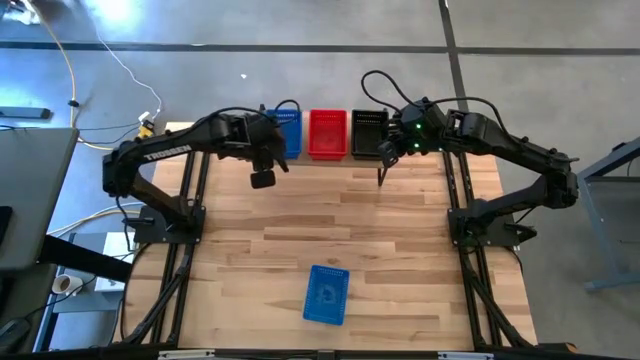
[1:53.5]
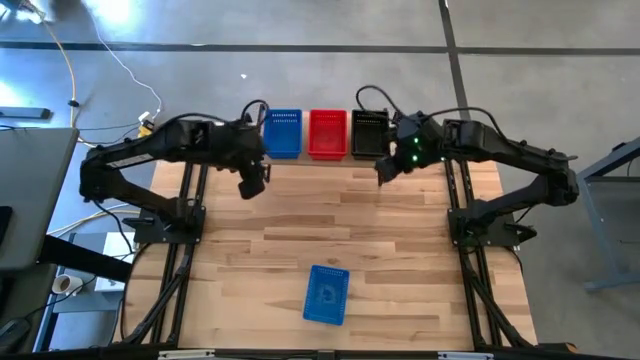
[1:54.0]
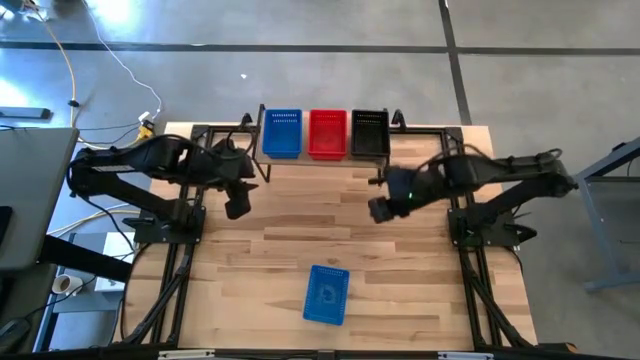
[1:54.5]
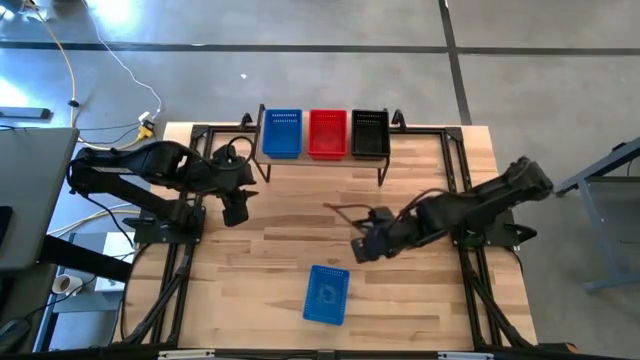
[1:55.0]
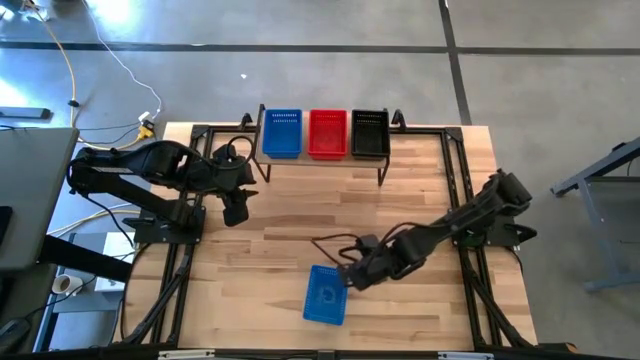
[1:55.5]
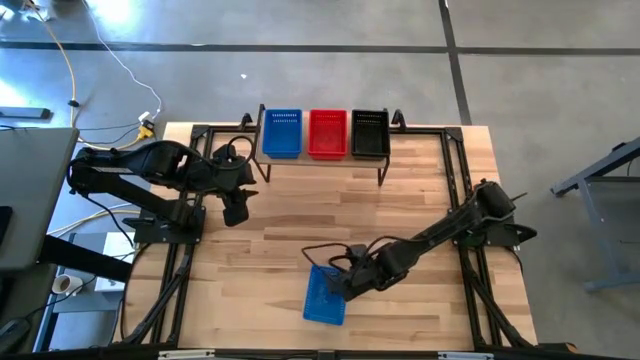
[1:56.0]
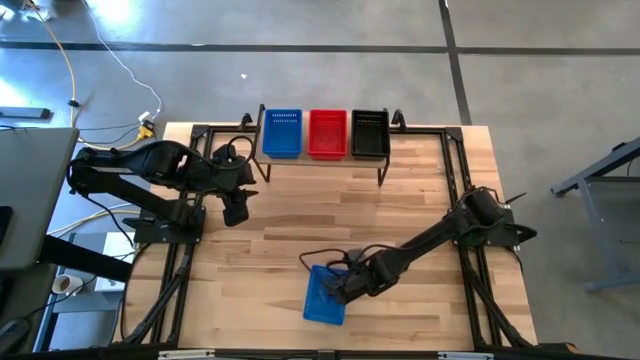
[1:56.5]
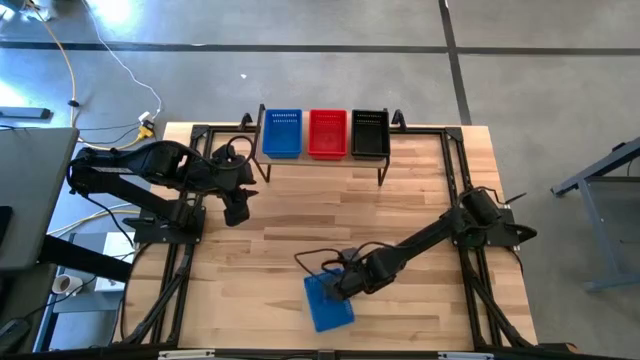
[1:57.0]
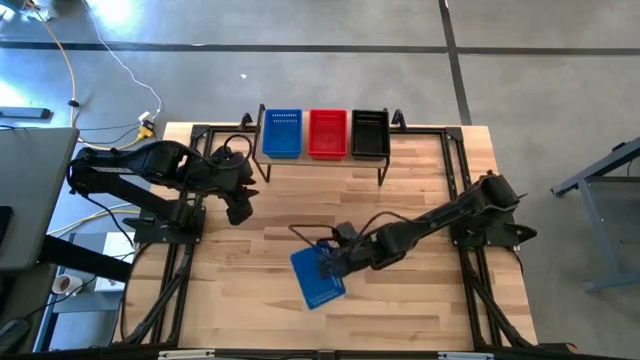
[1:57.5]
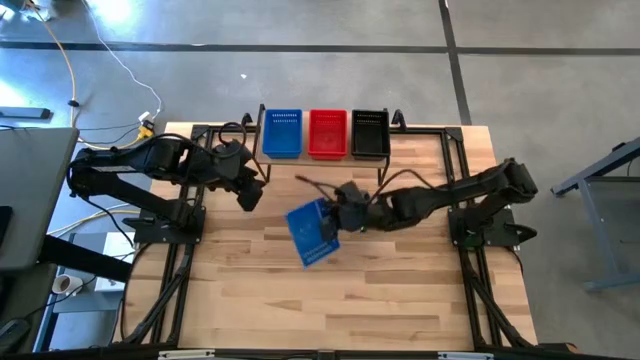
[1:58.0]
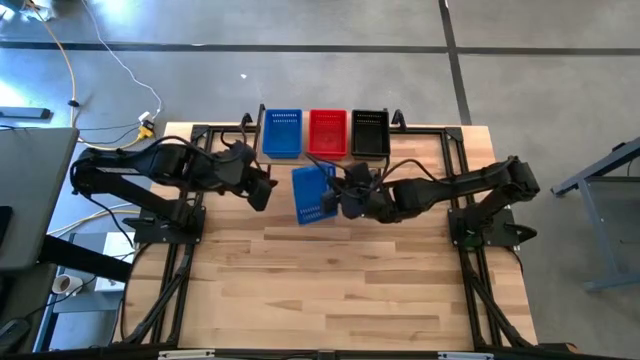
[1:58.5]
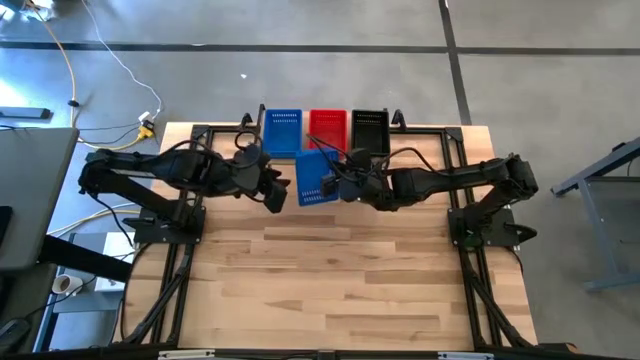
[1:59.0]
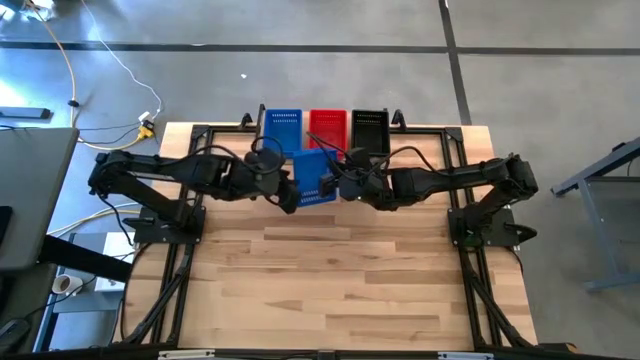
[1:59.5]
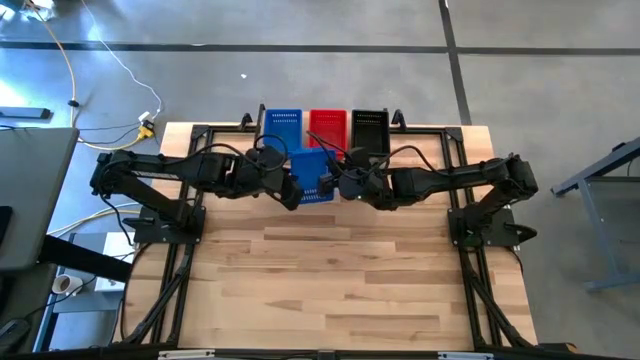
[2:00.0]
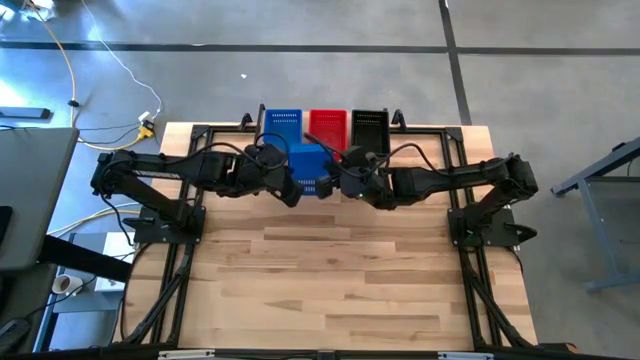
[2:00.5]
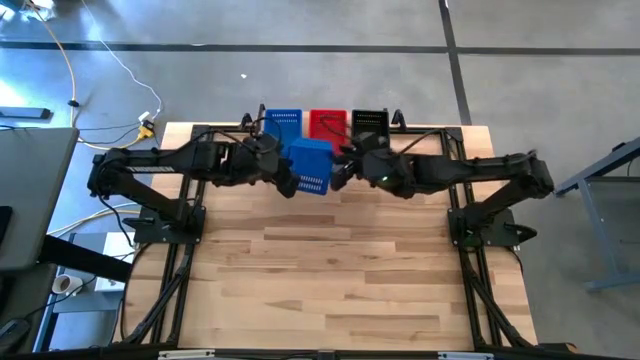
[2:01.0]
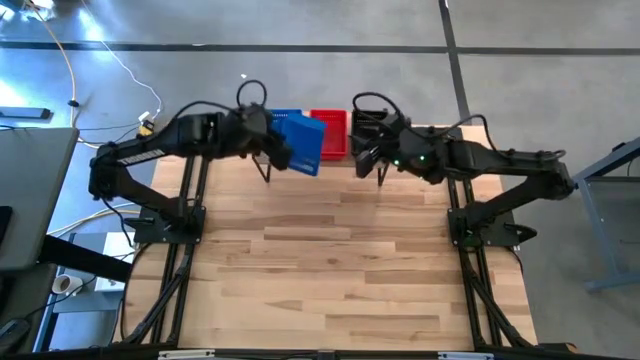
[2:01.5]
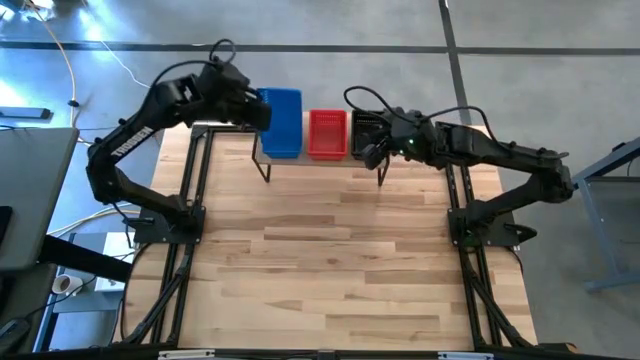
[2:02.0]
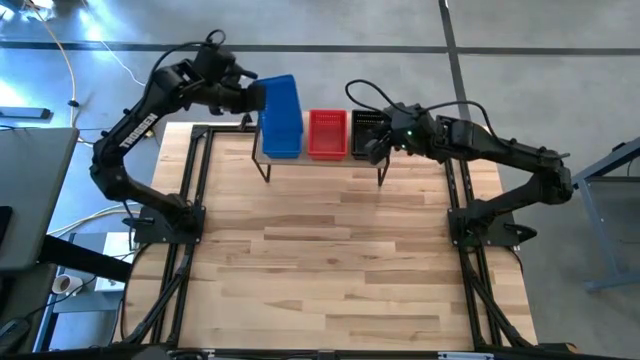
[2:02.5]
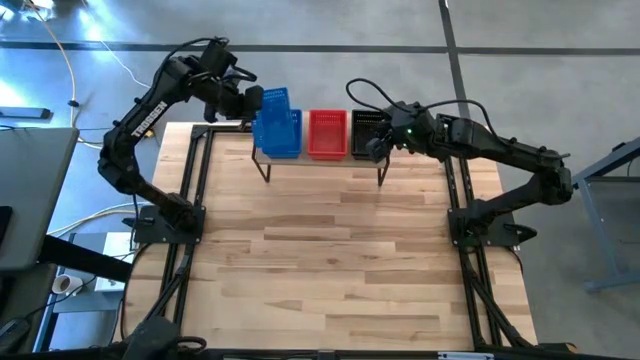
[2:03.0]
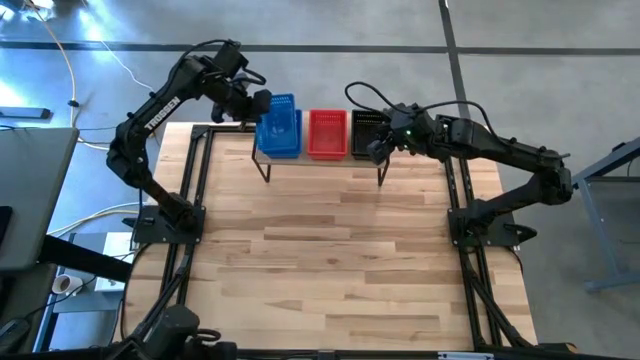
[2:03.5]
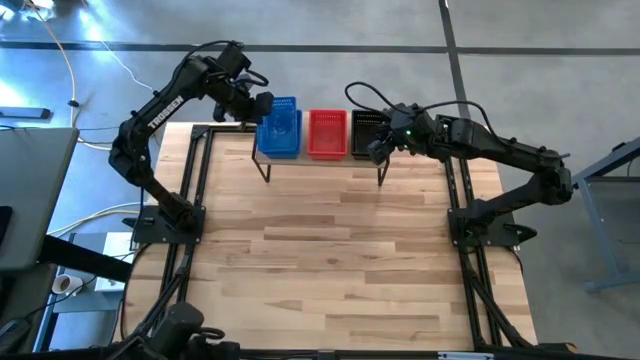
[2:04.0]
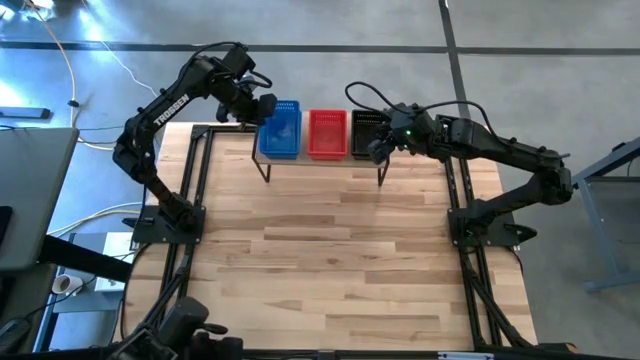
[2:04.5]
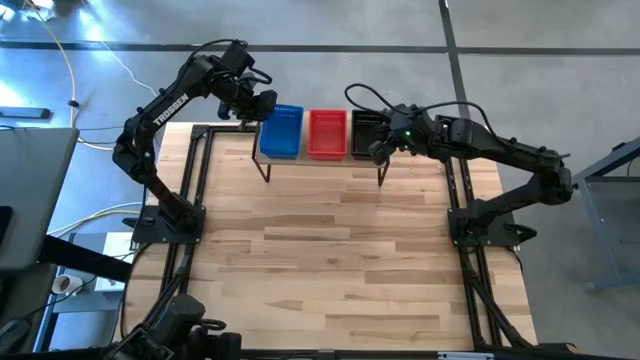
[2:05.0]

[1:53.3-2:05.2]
Task: Stack baskets on shelf by color
Stack the blue basket into the blue baskets on the shelf

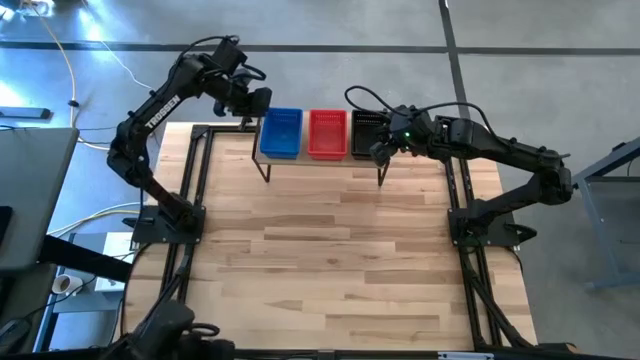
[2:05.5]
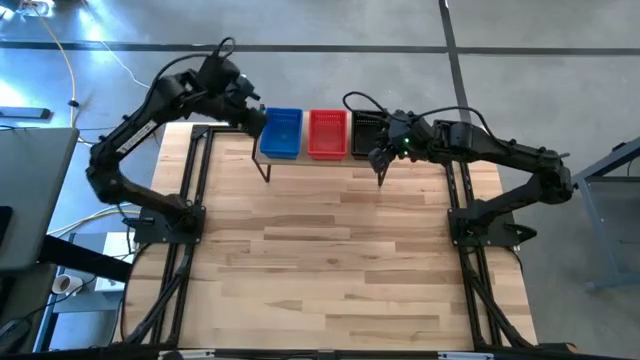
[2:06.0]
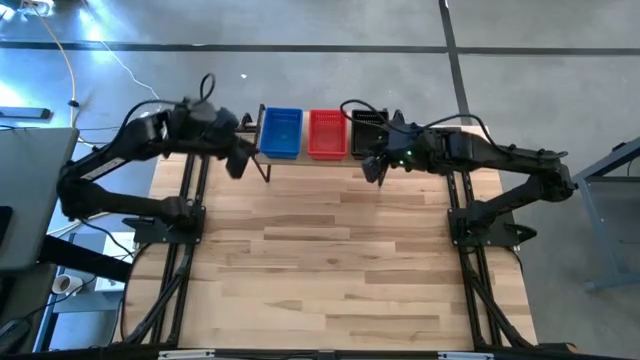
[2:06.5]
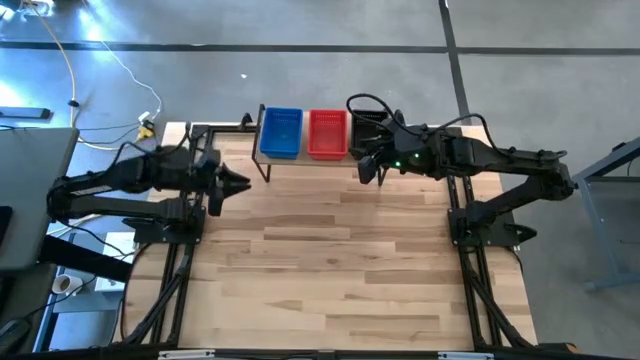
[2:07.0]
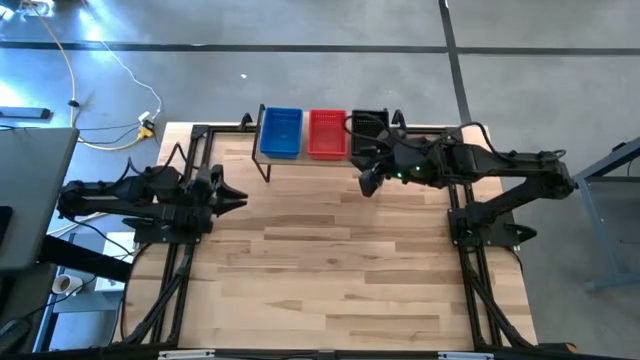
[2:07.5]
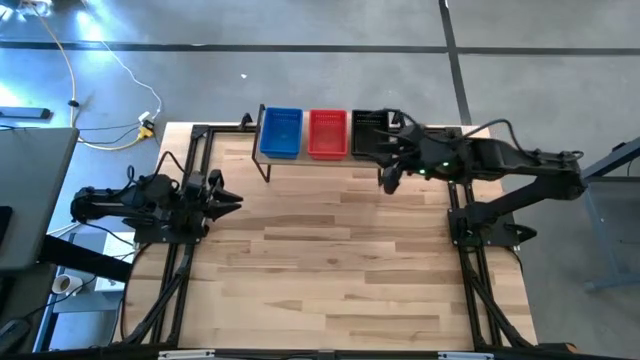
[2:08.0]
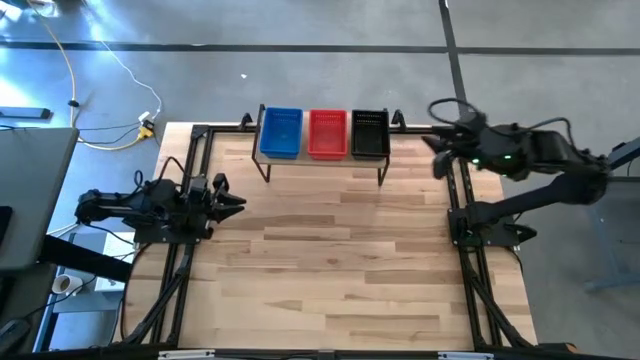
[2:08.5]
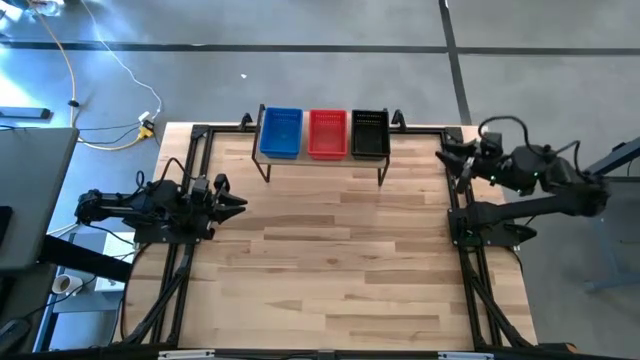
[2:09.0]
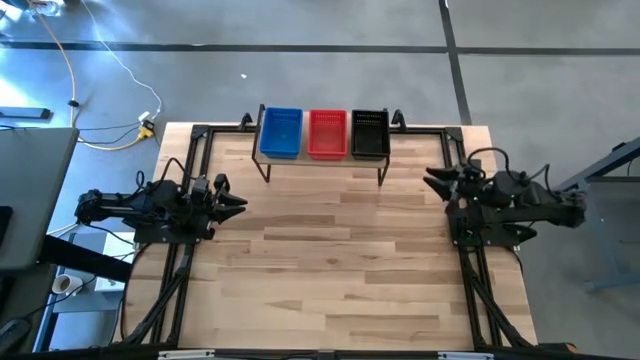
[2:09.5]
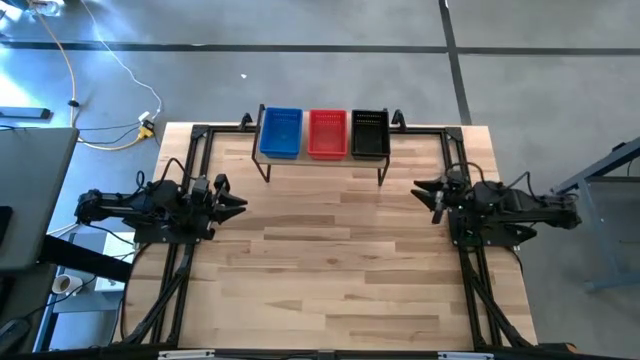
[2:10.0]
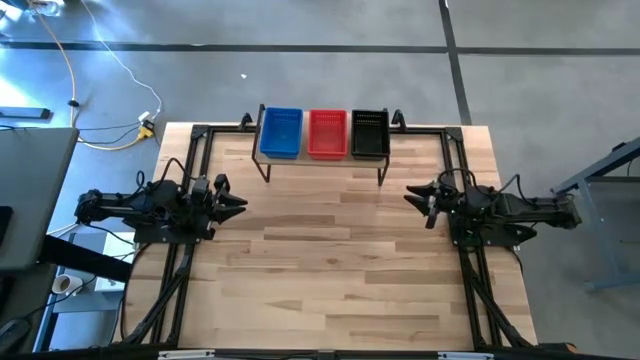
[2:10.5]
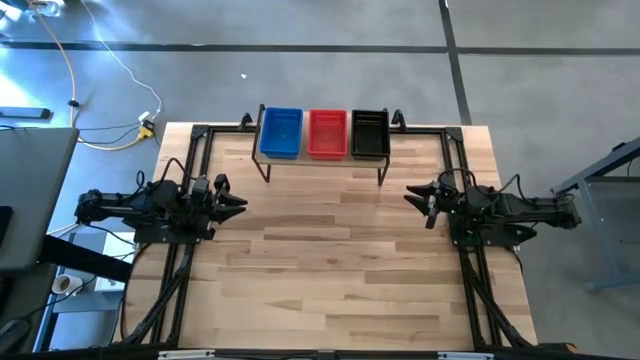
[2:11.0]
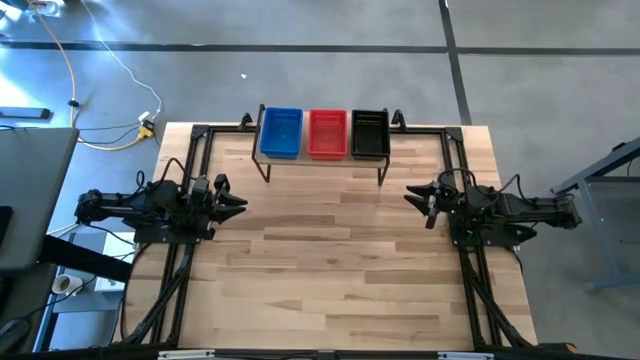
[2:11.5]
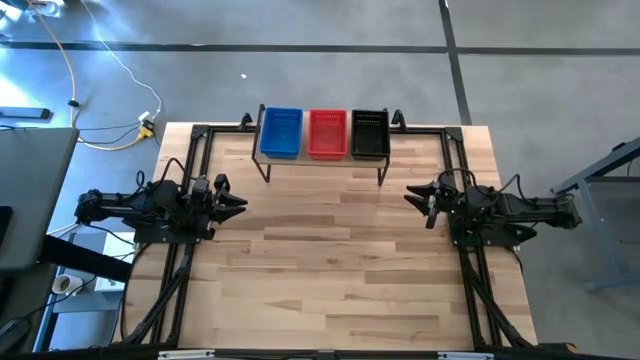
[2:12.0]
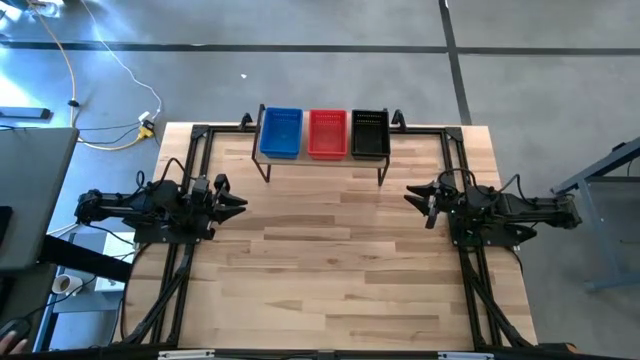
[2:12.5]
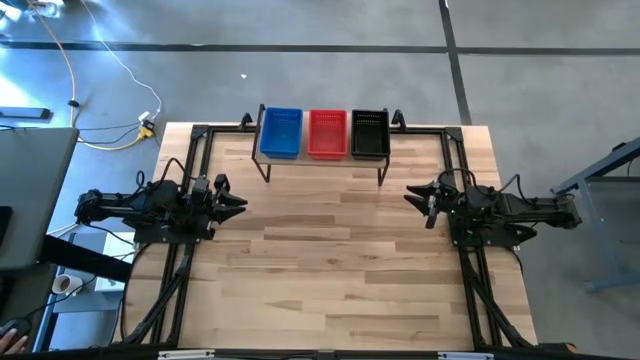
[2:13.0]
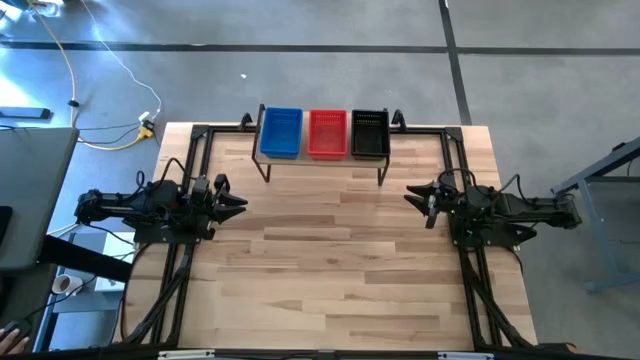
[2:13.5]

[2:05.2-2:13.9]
Return to Home Position

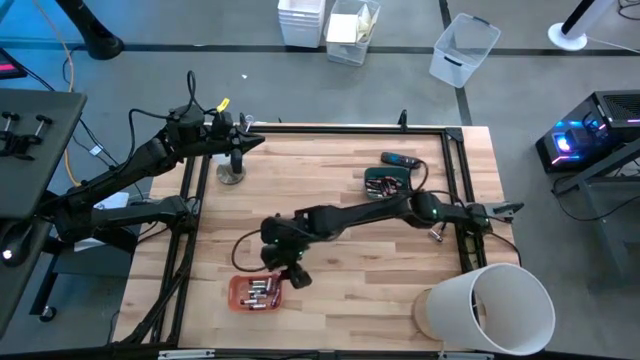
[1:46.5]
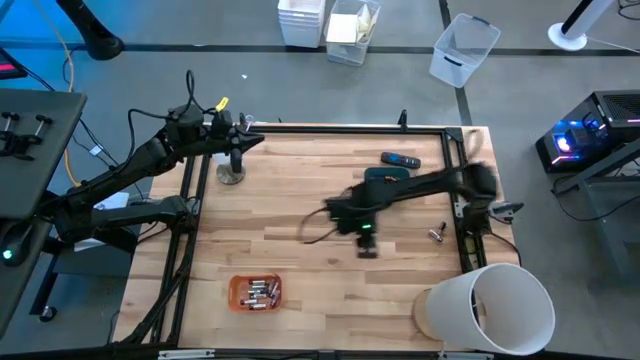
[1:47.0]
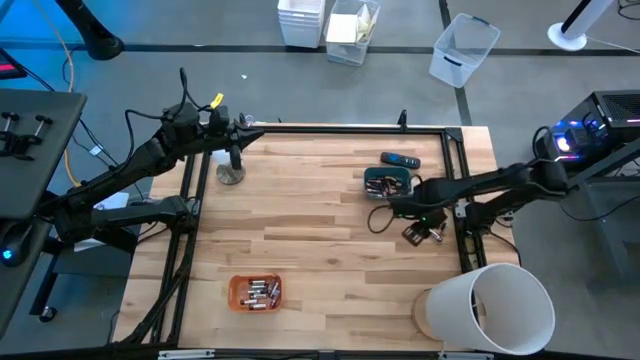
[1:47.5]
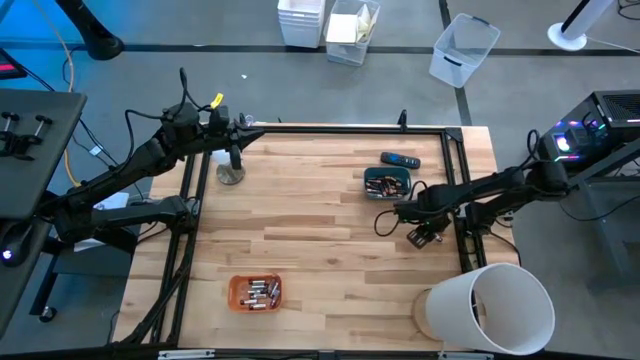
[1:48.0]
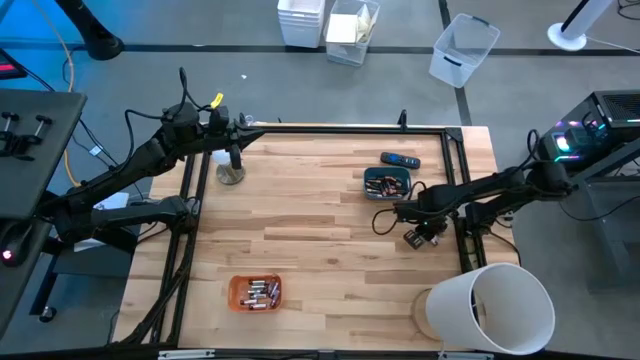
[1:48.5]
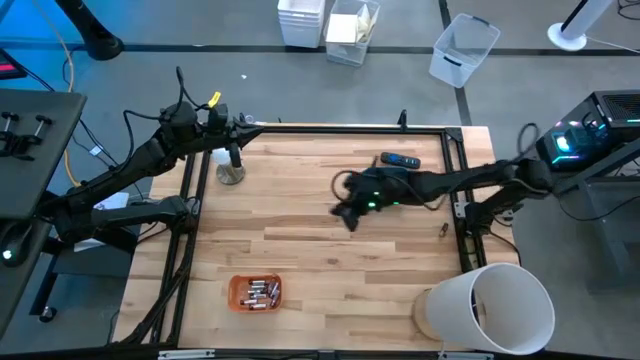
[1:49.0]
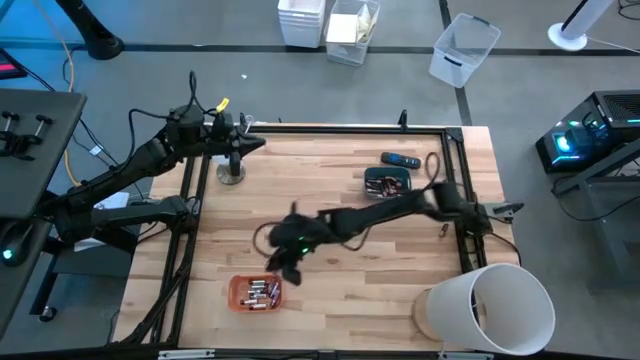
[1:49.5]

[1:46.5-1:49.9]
Task: Sort batteries
Put the silver battery into the orange bin
